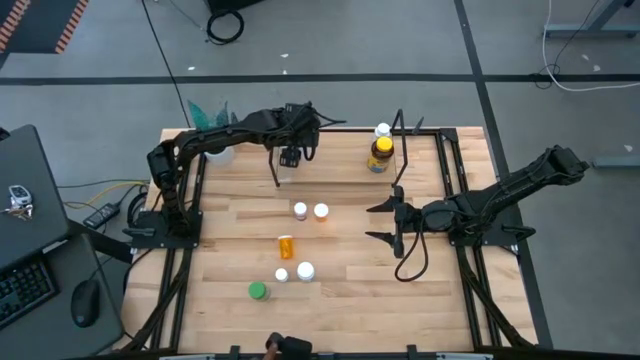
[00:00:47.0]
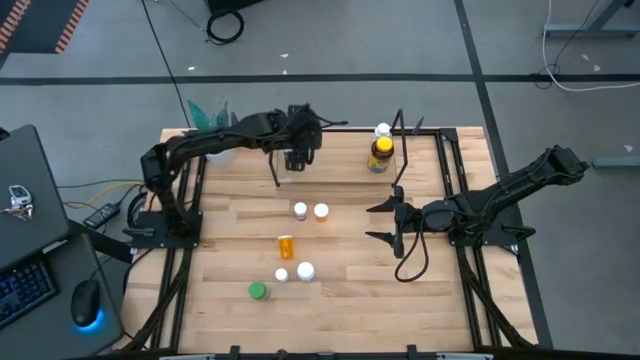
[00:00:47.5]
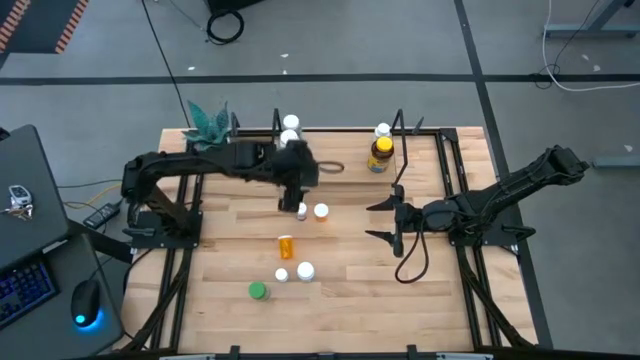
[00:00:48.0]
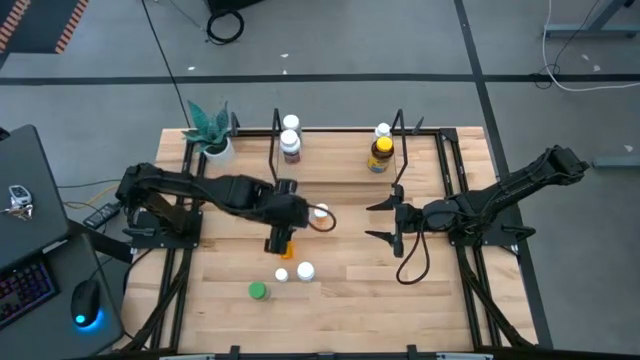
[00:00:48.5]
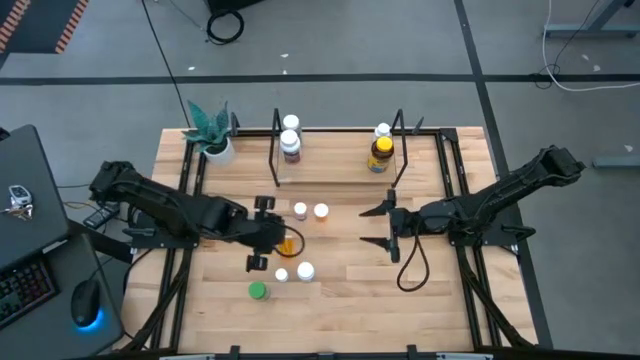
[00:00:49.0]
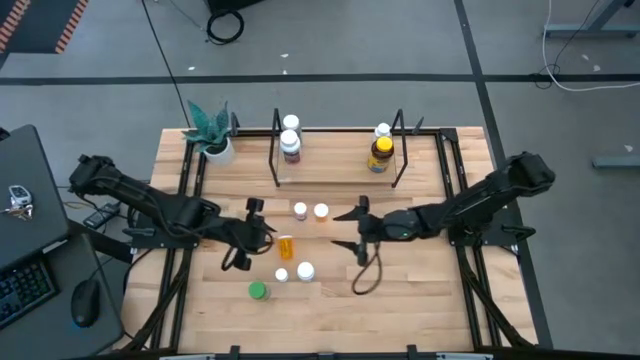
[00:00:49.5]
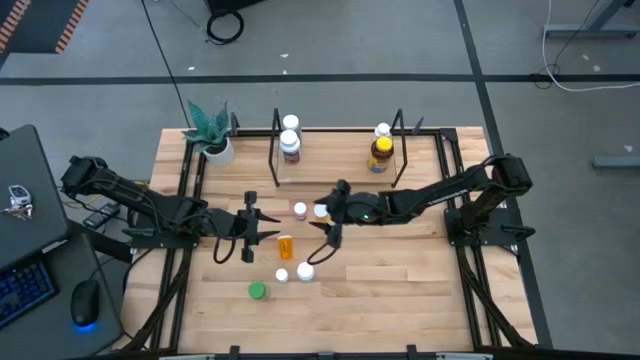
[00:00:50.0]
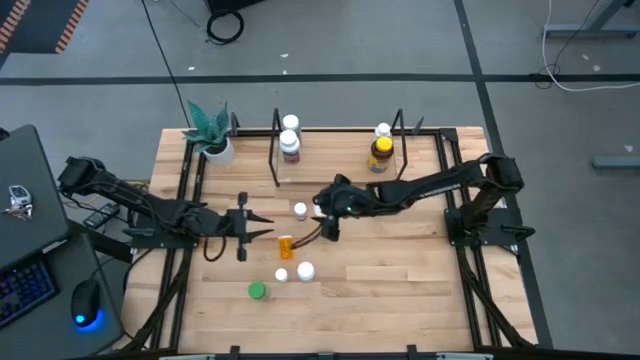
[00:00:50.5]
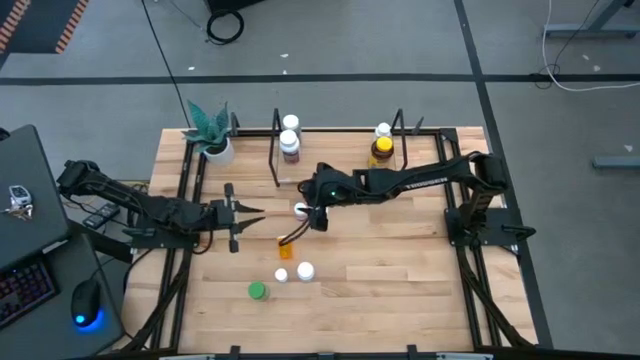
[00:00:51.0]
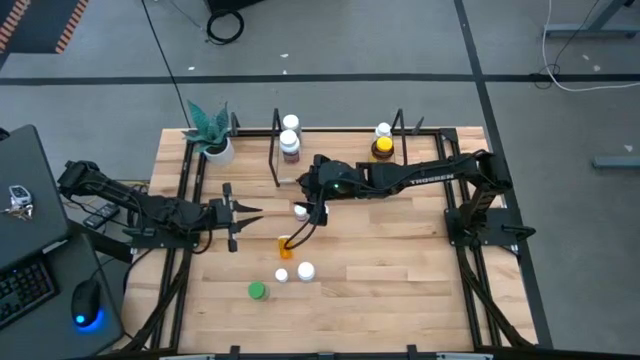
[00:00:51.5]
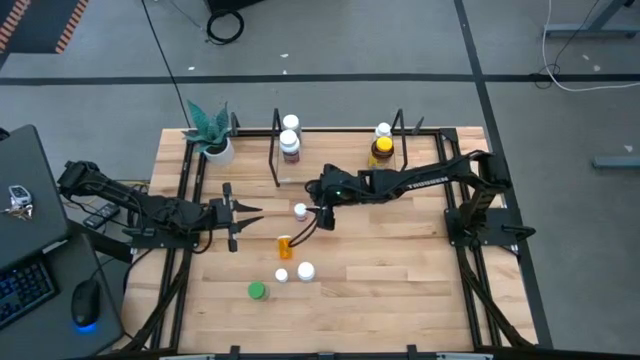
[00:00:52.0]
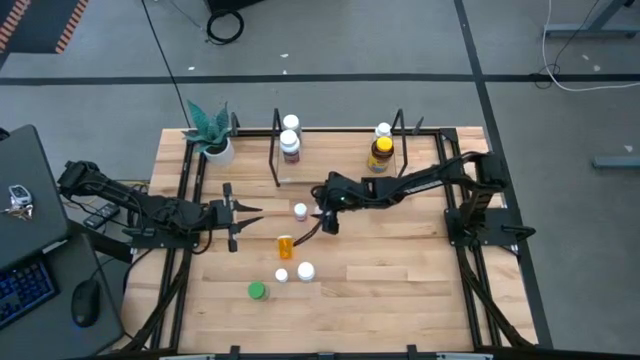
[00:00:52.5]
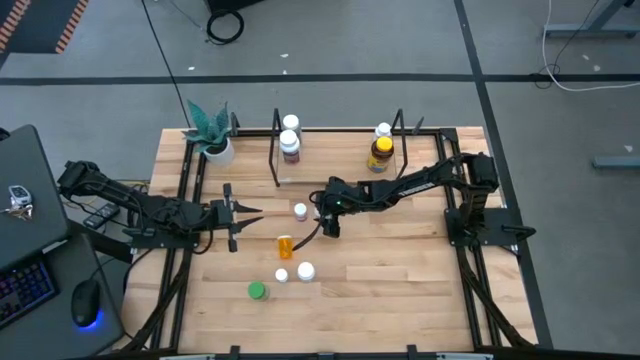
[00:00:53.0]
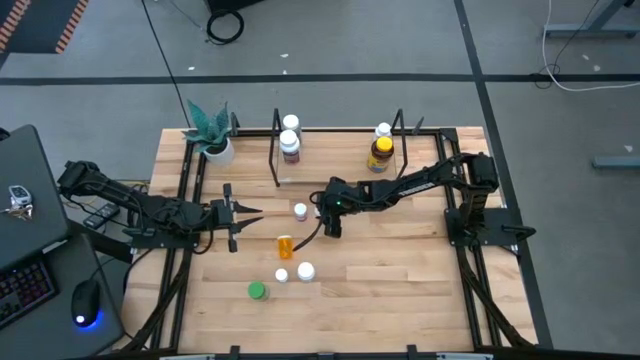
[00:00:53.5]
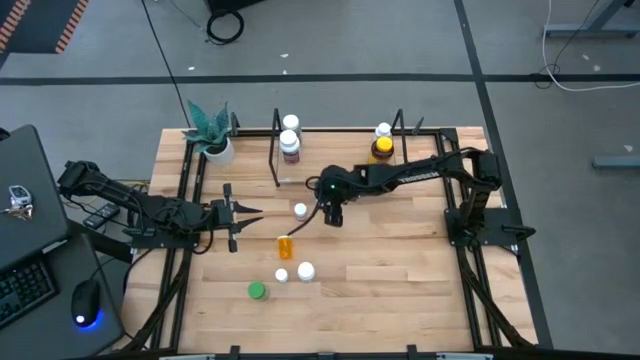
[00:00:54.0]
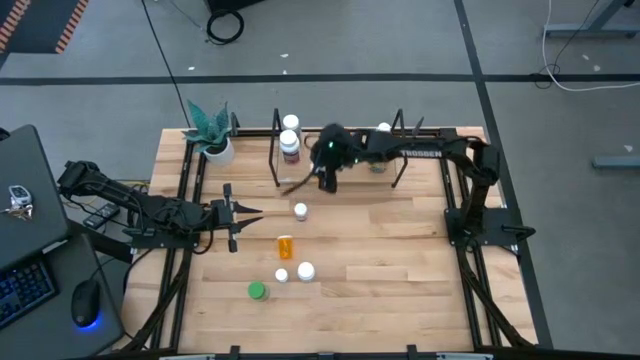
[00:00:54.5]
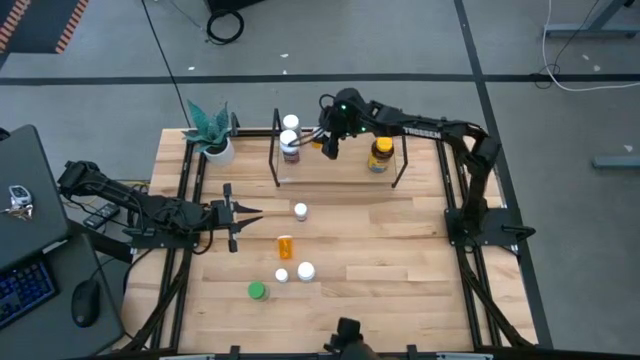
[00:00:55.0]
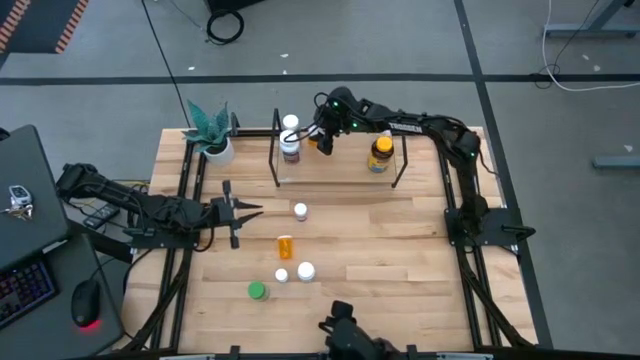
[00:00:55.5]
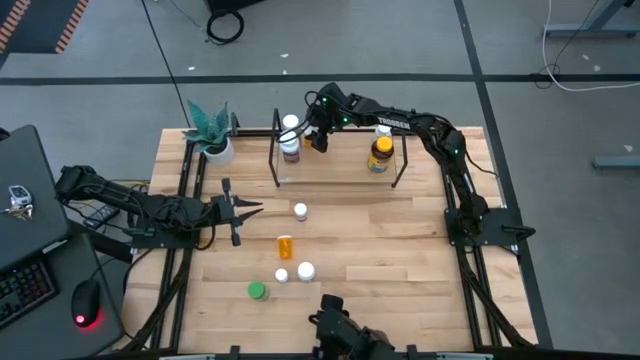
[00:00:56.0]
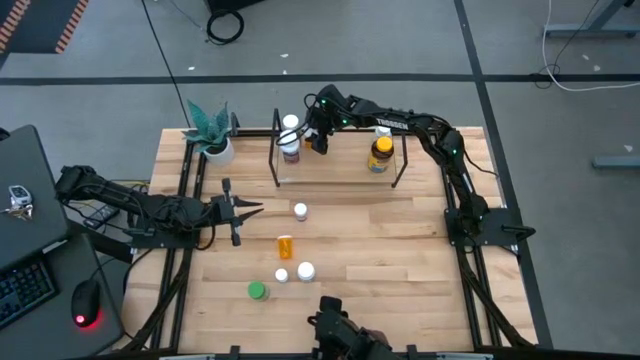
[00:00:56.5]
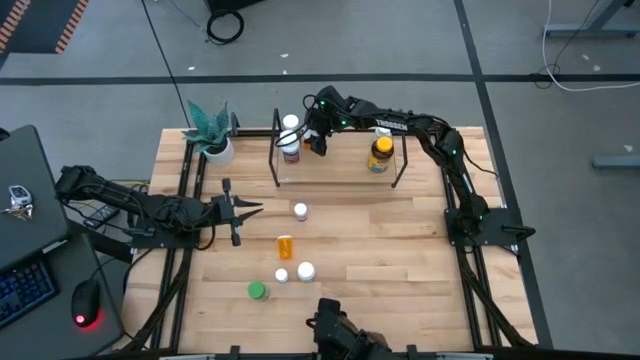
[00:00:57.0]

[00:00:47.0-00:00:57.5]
Task: Pick and place medicine bottles onto shelf by color
Put the top orange pill bottle on the shelf

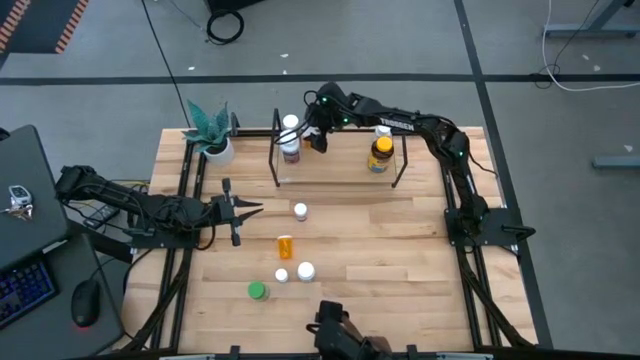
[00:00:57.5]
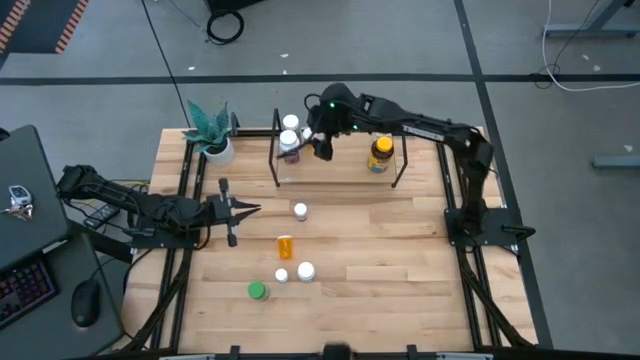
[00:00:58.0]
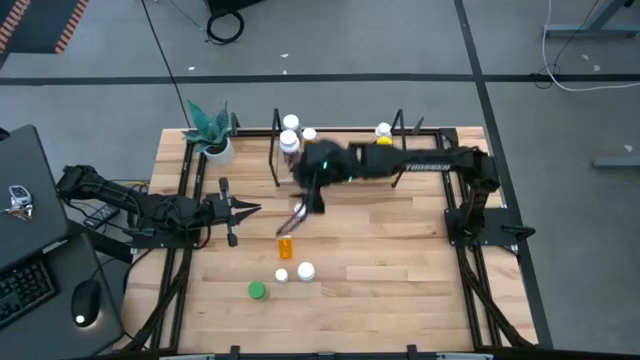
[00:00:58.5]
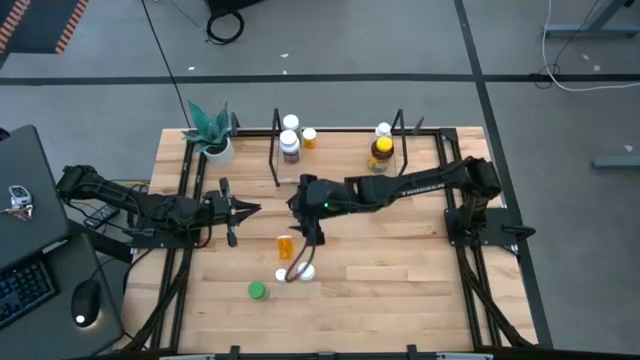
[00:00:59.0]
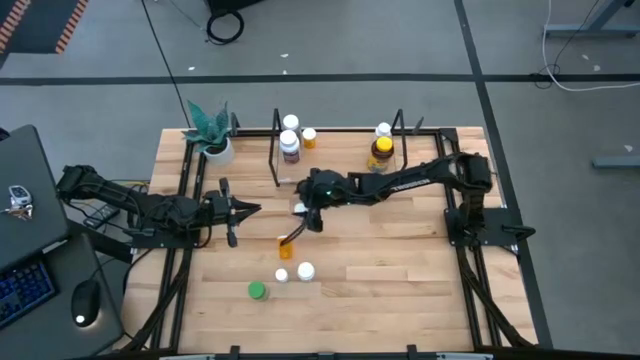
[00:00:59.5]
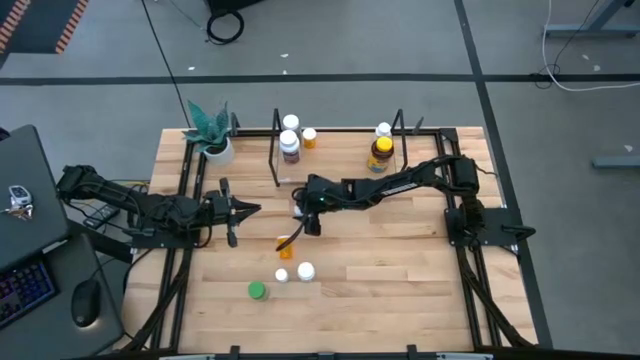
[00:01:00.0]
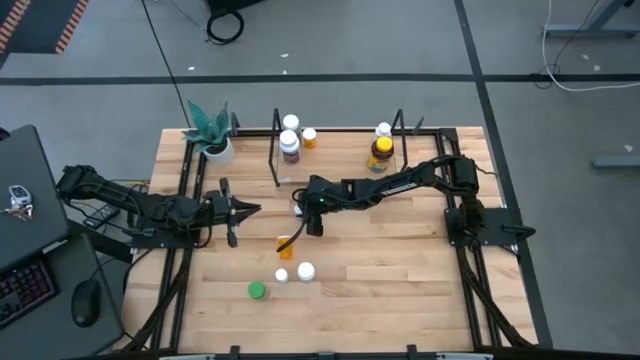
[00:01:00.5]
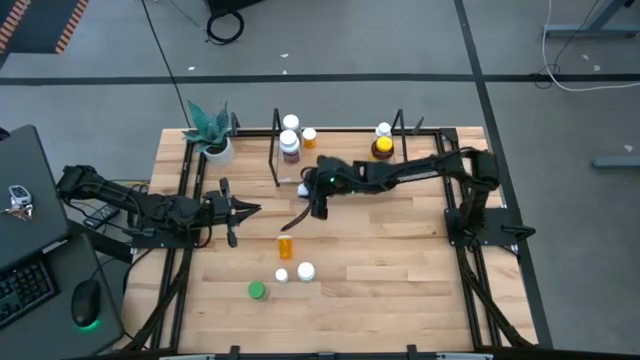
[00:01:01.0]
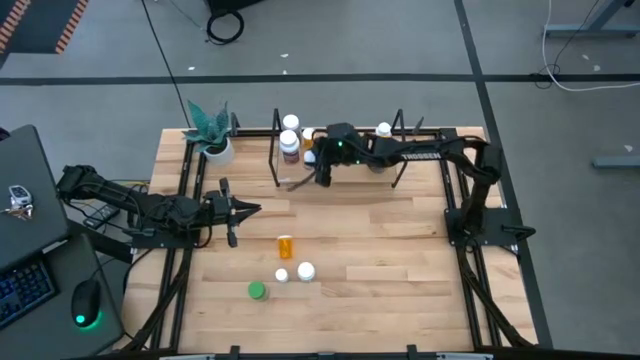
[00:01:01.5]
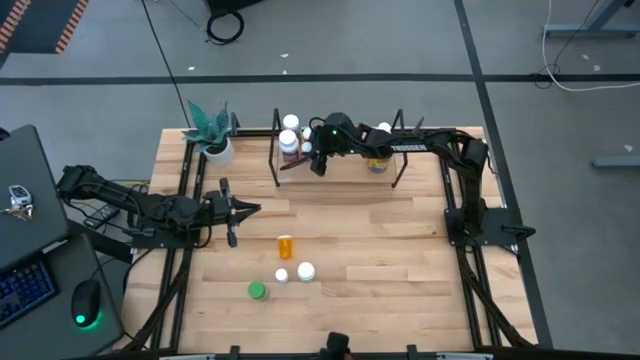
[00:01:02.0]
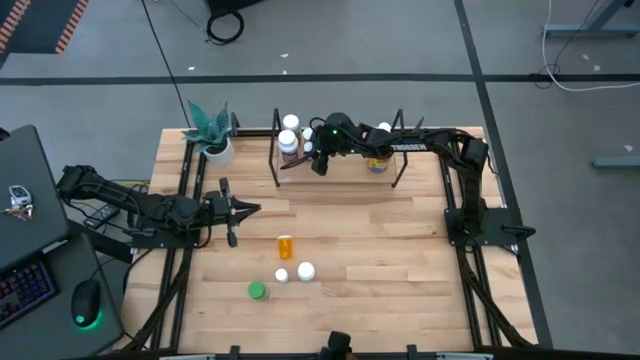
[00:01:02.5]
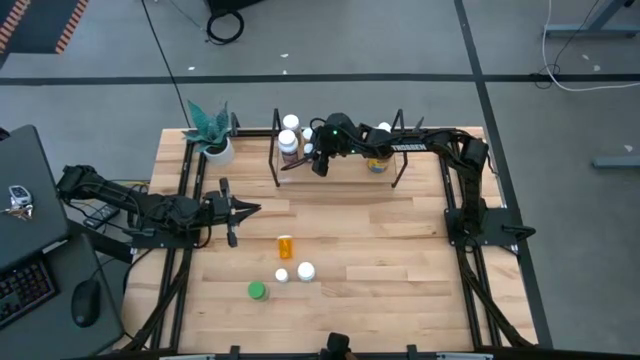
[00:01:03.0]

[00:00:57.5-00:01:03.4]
Put the pink pill bottle on the shelf

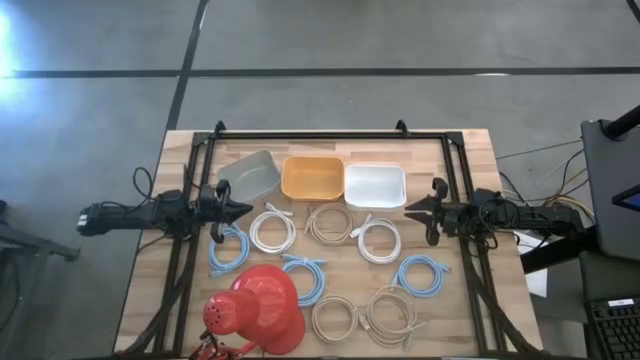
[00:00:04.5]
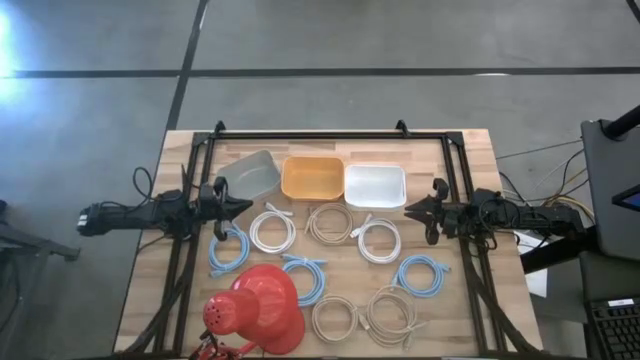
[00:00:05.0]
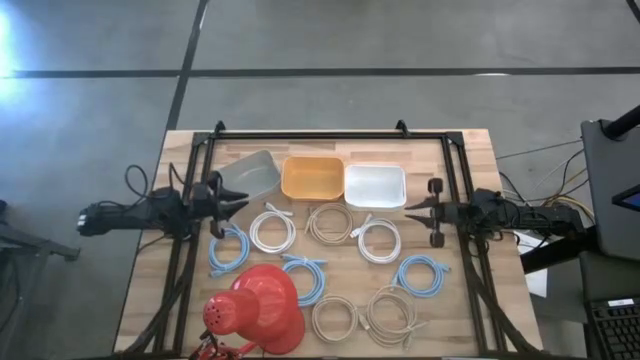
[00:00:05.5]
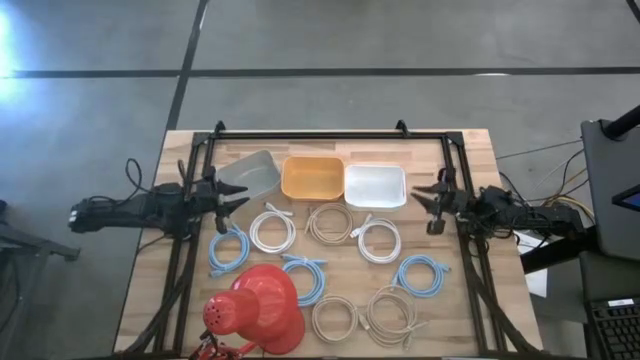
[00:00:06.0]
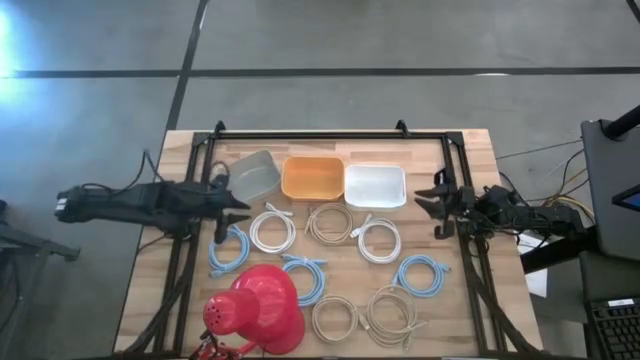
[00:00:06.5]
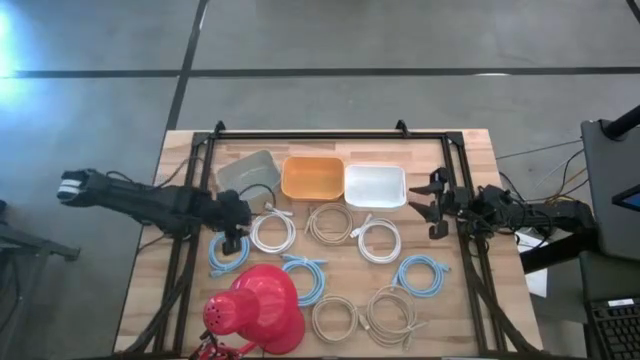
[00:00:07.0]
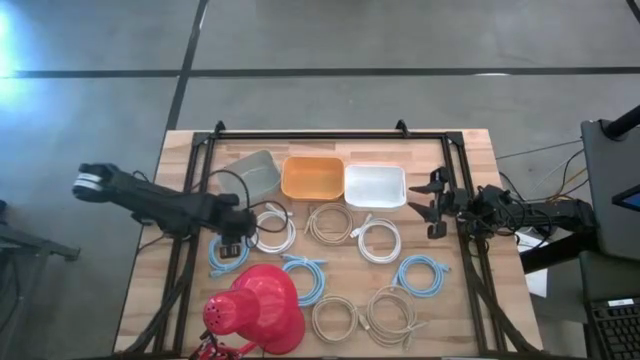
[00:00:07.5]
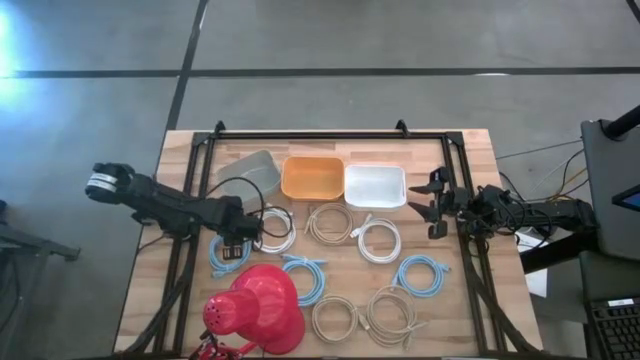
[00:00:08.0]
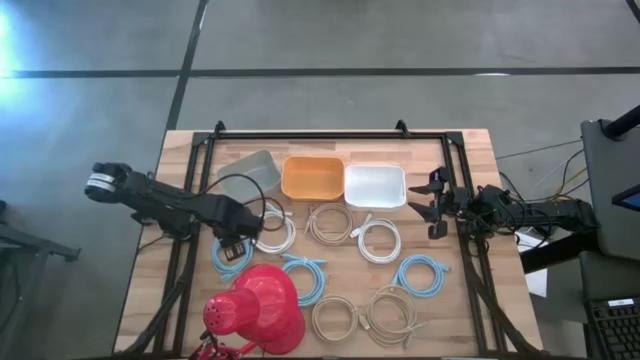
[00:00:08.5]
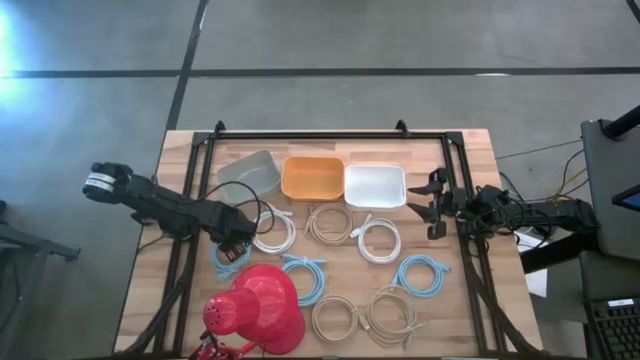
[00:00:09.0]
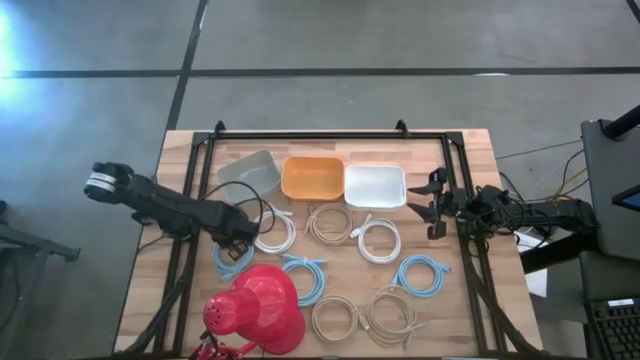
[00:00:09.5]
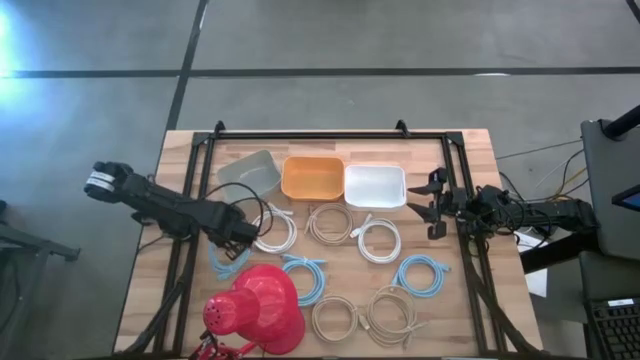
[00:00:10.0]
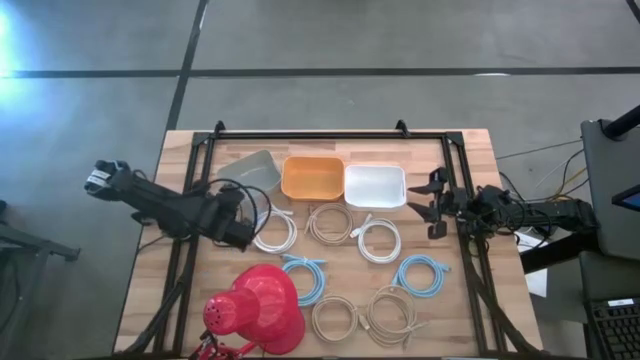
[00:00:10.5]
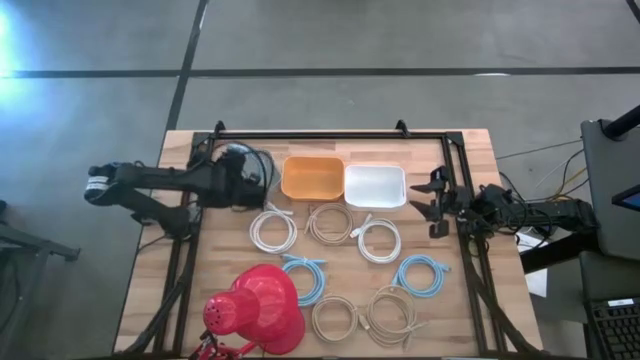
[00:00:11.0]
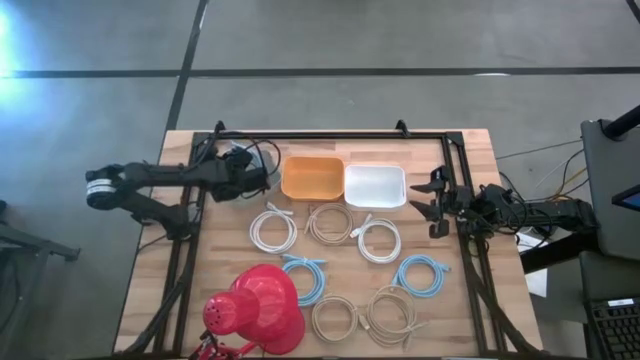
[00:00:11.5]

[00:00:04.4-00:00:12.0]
Task: Sort HDMI cables
Put the top light blue HDMI cable into the gray bin
